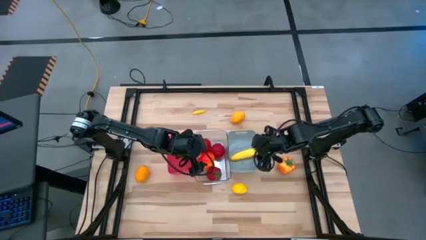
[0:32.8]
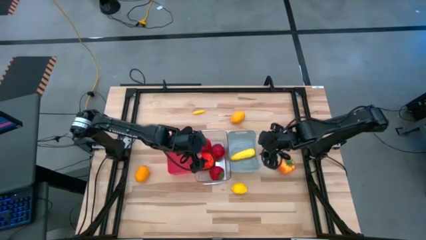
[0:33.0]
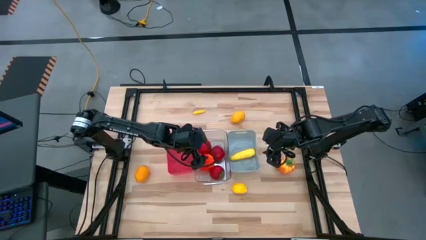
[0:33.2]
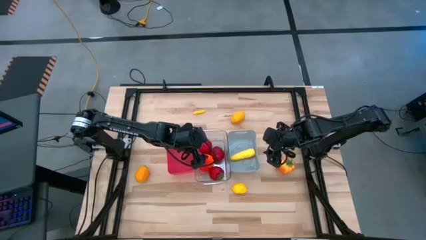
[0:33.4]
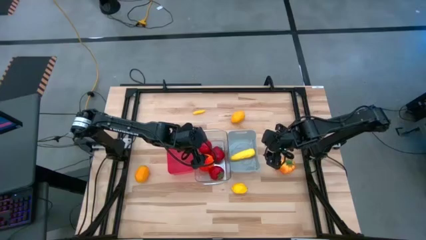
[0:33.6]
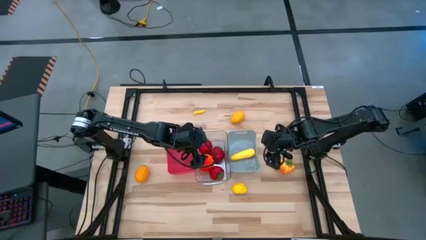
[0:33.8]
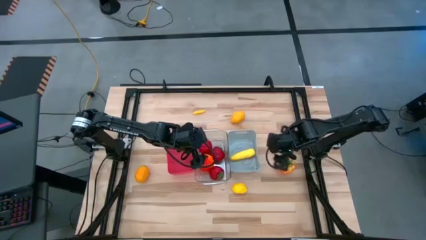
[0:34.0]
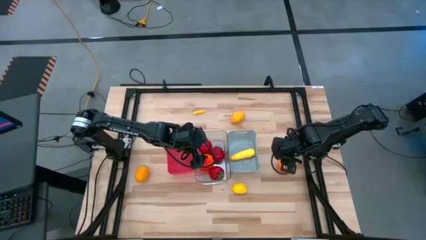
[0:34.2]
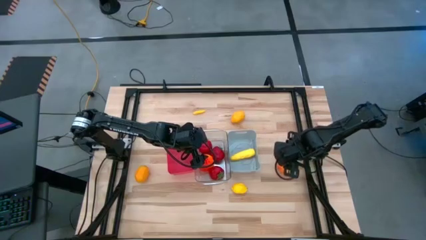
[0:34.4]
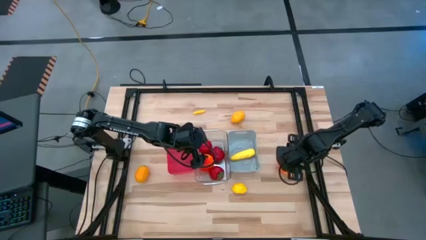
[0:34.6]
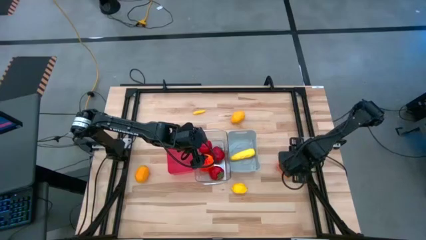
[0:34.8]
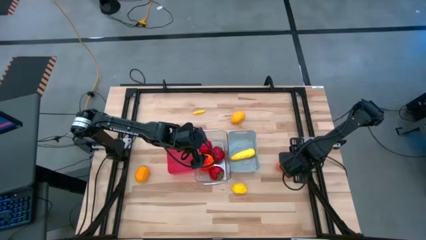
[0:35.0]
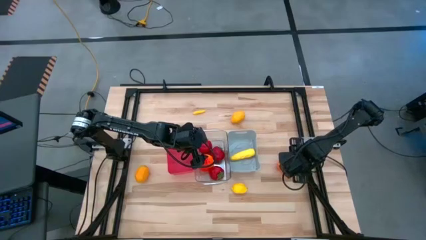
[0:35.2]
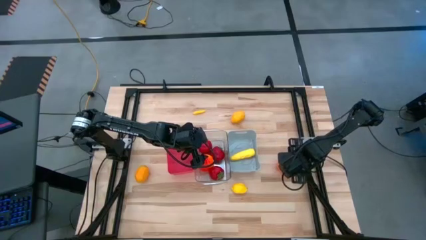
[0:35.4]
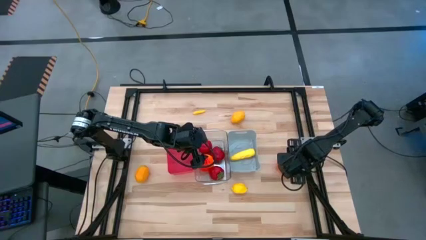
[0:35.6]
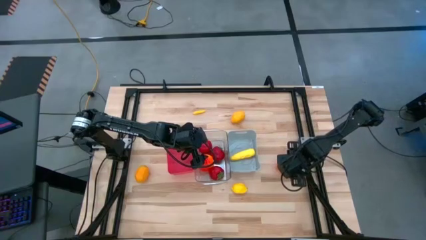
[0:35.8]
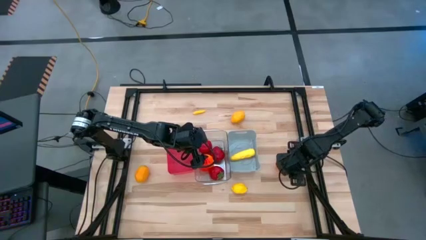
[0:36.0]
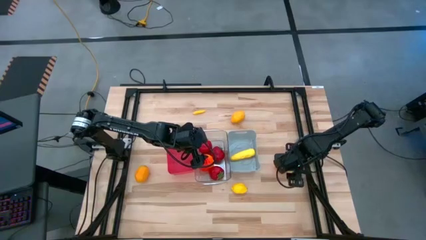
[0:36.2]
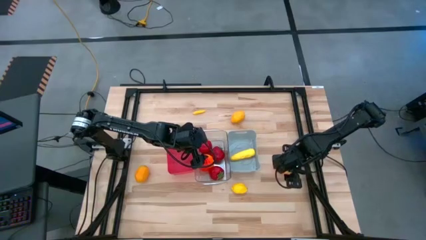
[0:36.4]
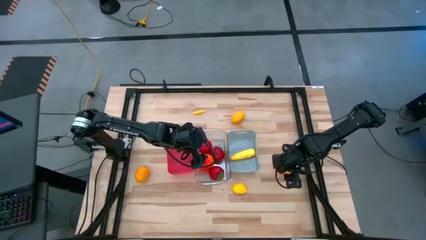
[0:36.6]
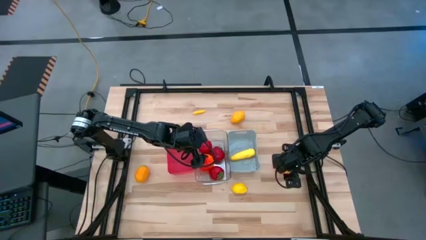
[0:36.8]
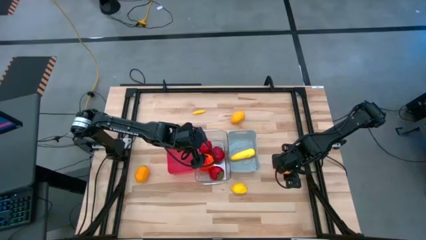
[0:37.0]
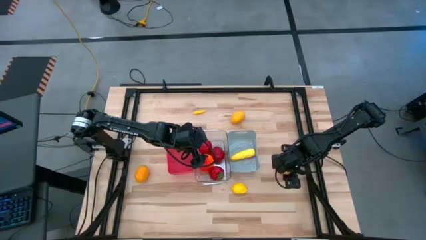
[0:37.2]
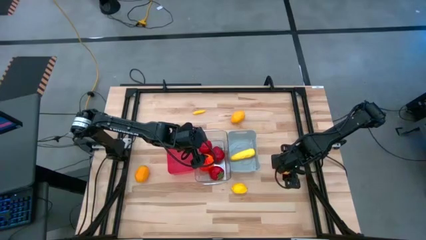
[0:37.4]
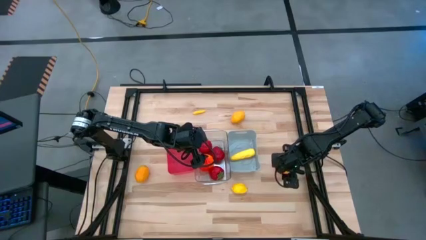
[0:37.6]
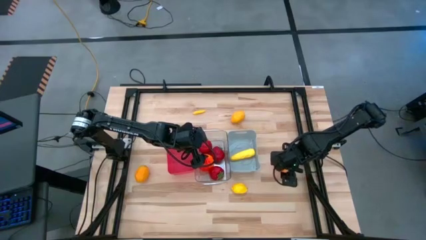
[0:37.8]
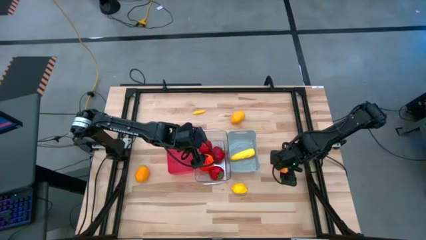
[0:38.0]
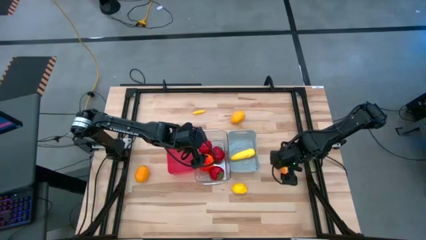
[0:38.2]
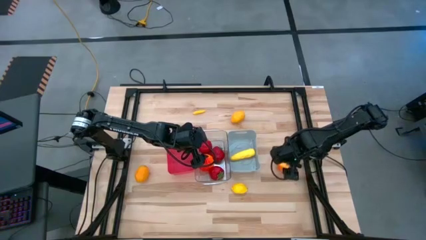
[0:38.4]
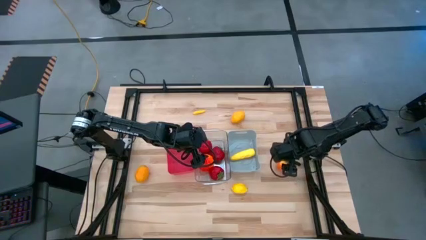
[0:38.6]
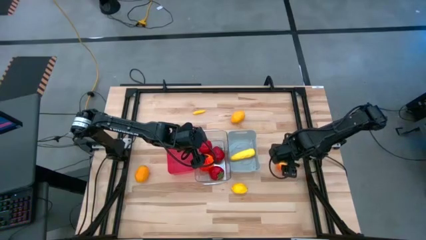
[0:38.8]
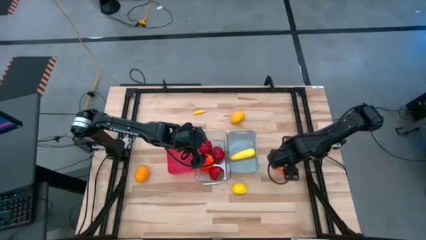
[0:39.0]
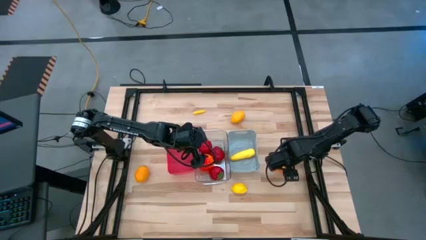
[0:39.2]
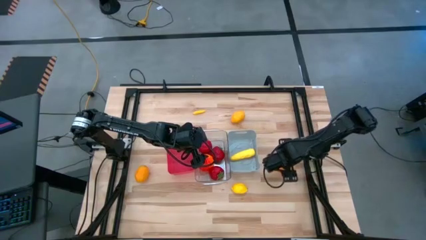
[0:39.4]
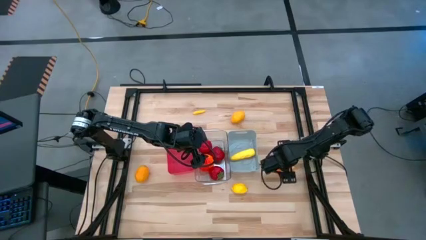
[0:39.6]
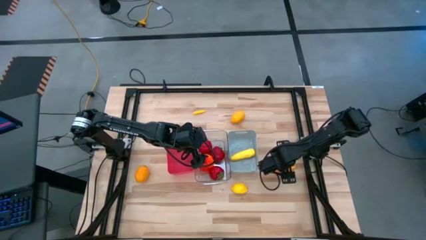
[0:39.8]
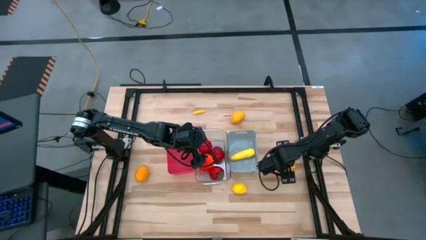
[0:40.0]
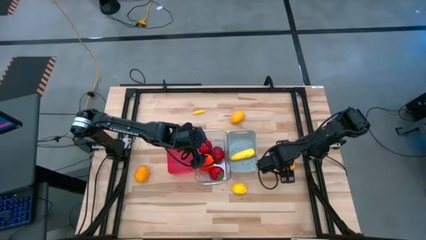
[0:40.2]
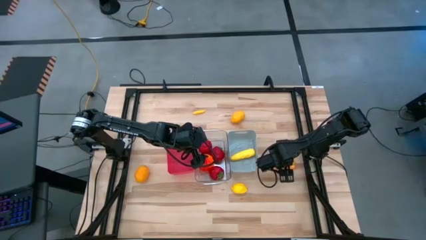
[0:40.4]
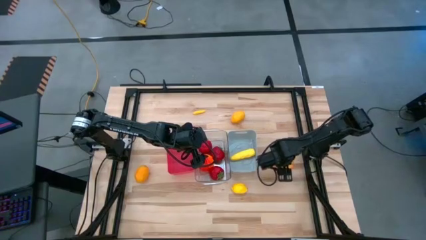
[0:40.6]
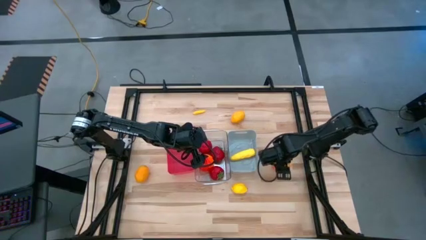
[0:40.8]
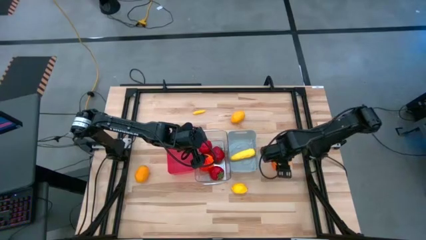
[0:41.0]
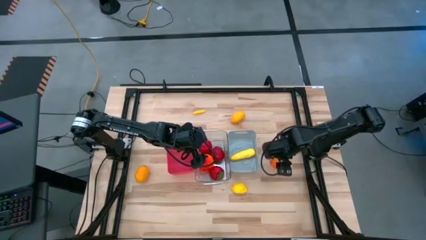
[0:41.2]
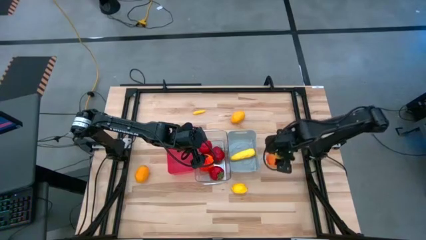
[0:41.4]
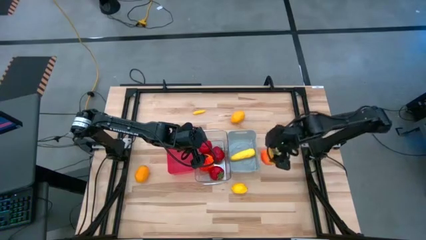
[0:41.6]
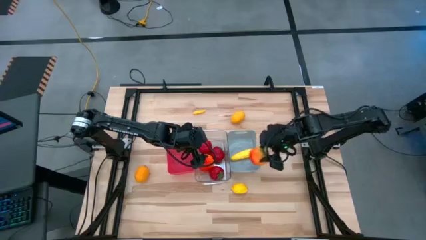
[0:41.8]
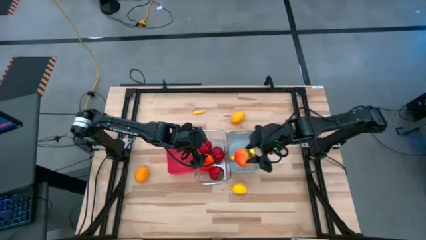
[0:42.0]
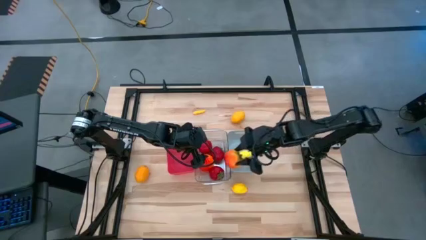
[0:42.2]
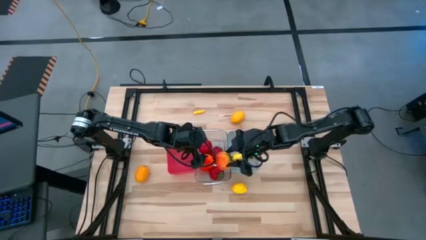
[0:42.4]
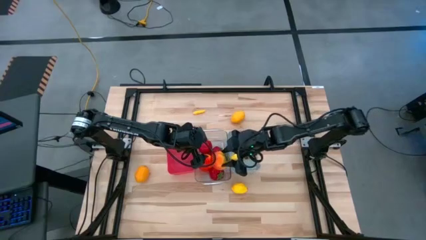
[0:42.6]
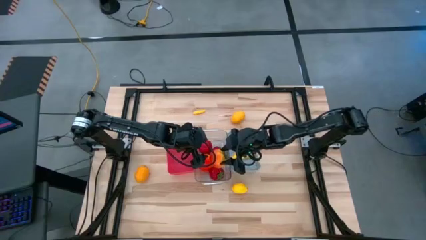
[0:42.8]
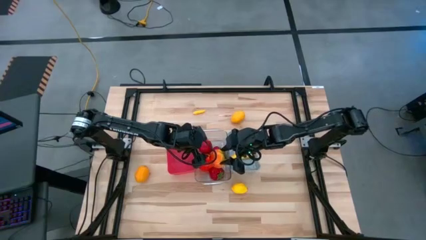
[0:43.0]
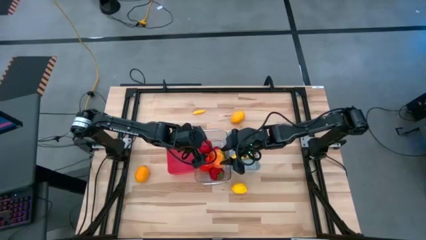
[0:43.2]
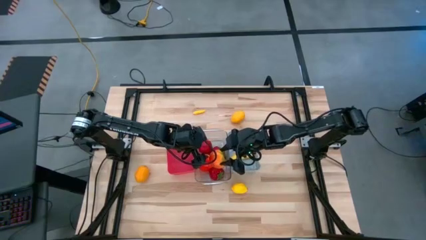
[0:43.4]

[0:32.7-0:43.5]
Task: Sort produce into baskets
Put the orange tomato into the transparent bin

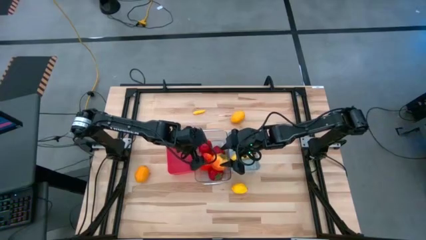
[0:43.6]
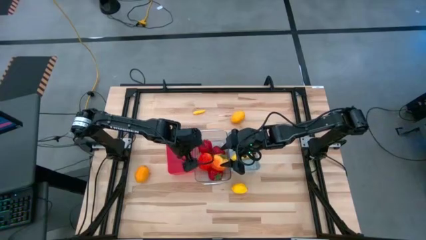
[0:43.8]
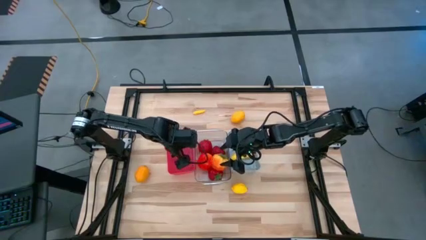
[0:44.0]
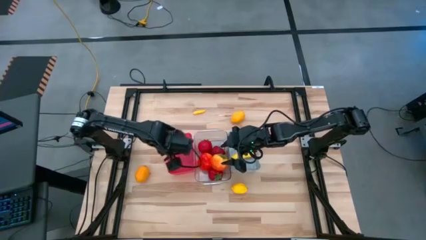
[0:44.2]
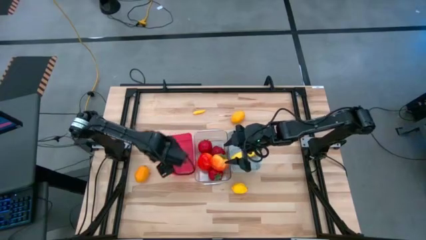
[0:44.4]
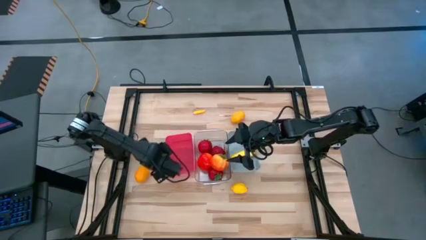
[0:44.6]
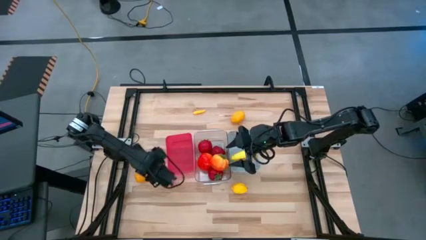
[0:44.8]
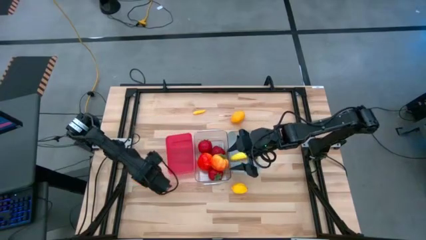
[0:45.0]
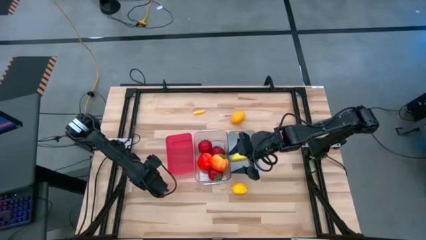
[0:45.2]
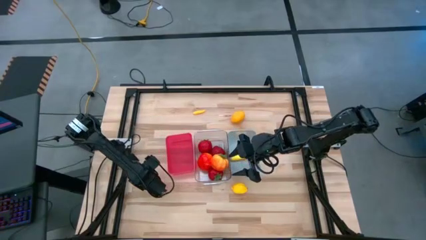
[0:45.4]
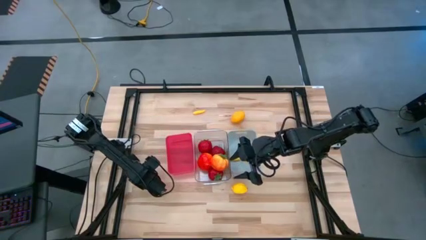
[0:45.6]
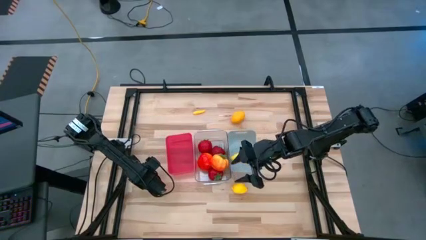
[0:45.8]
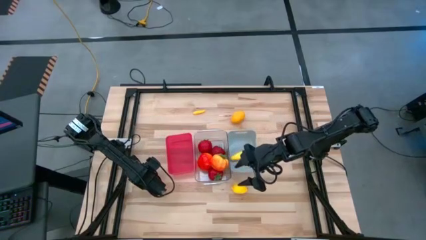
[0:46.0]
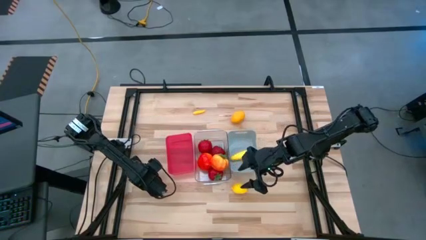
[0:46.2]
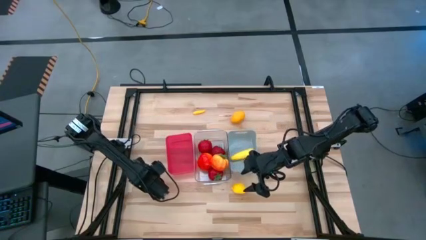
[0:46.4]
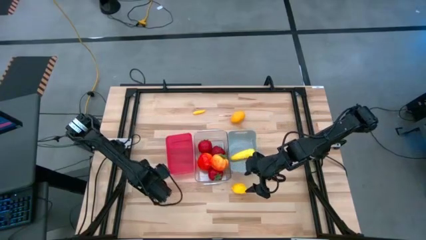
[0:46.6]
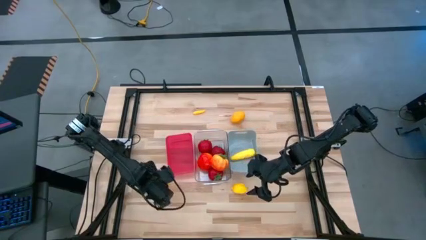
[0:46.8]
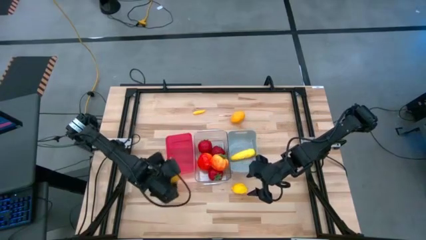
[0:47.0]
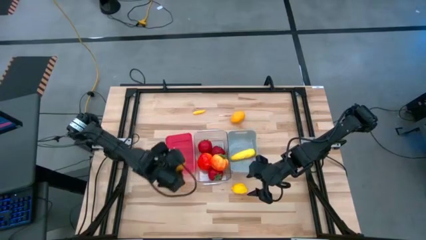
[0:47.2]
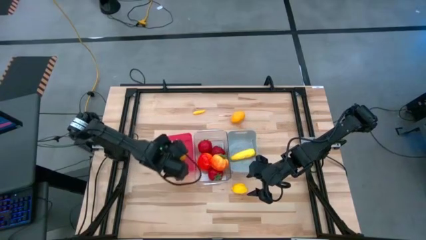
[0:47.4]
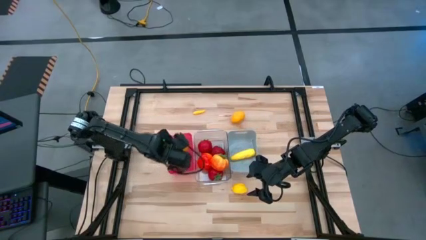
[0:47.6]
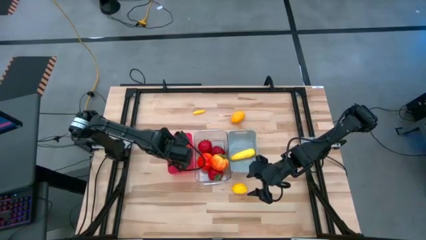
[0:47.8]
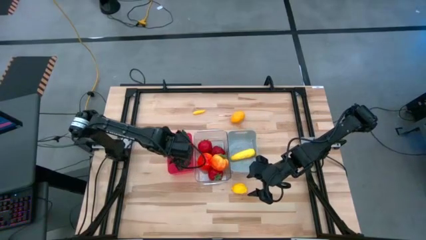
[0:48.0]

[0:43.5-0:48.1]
Put the bottom left yellow lemon into the red bin
